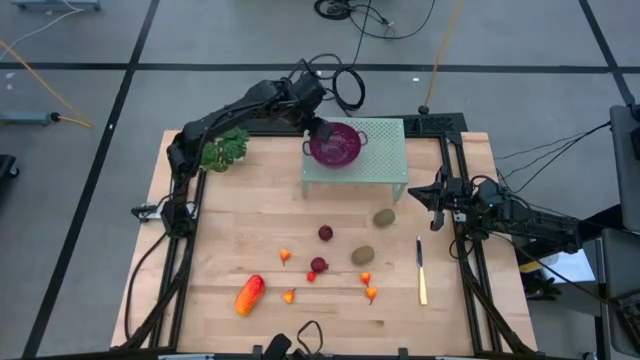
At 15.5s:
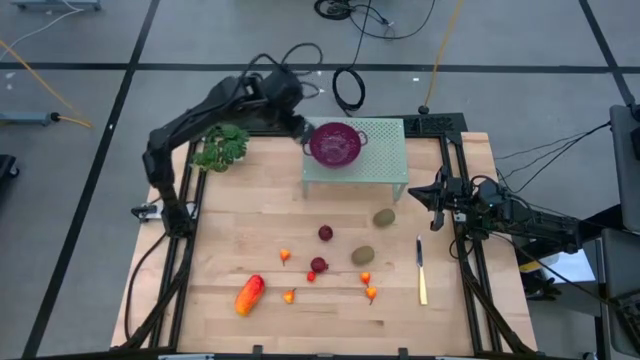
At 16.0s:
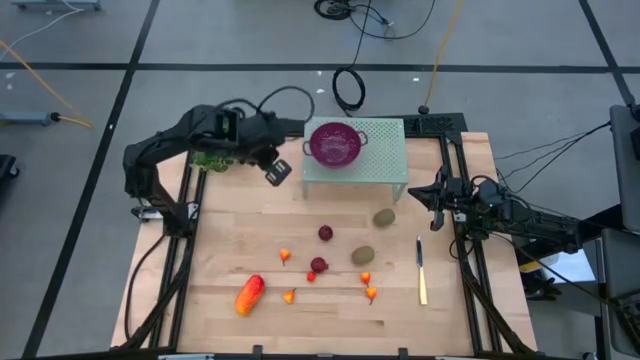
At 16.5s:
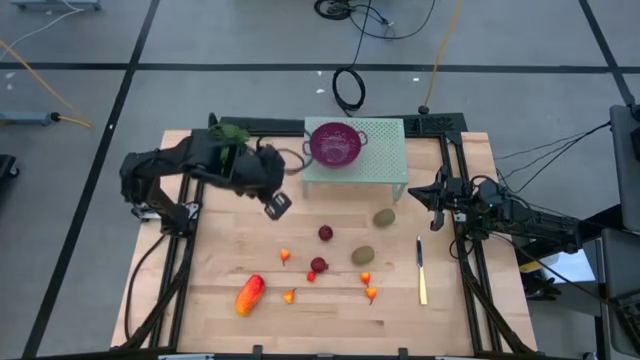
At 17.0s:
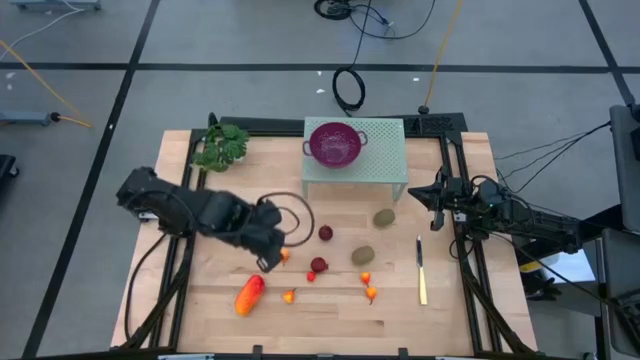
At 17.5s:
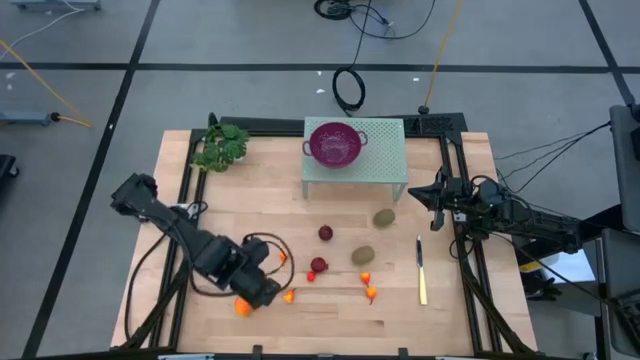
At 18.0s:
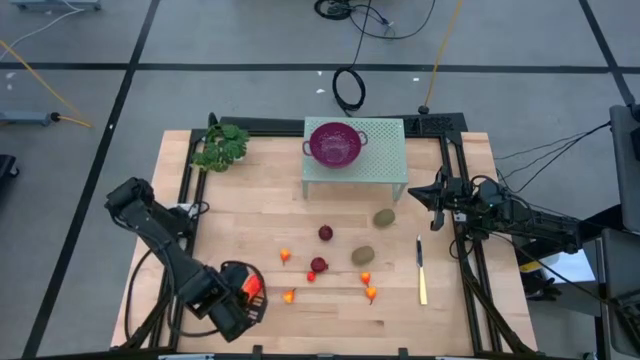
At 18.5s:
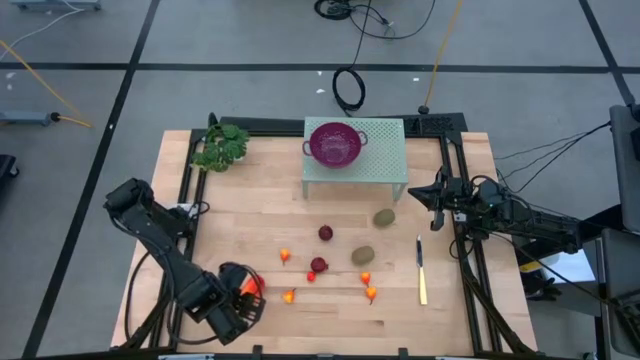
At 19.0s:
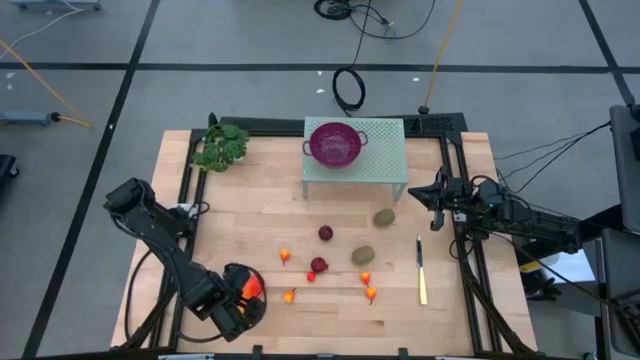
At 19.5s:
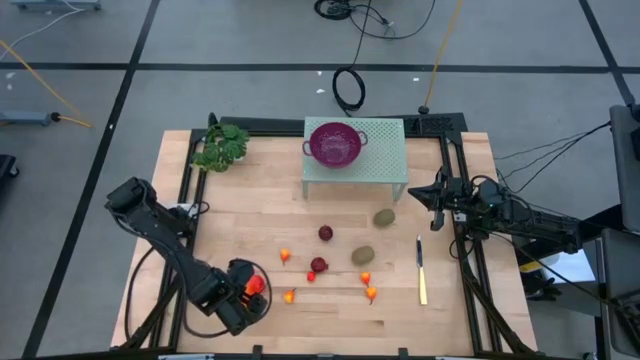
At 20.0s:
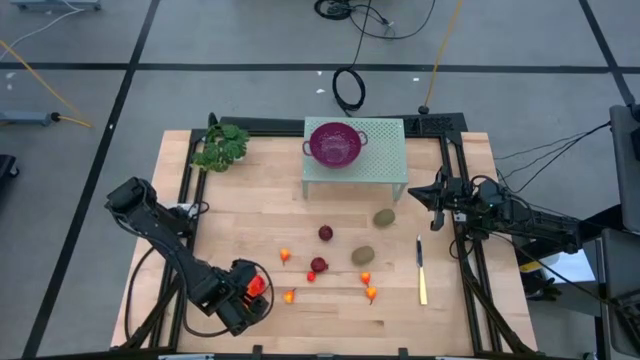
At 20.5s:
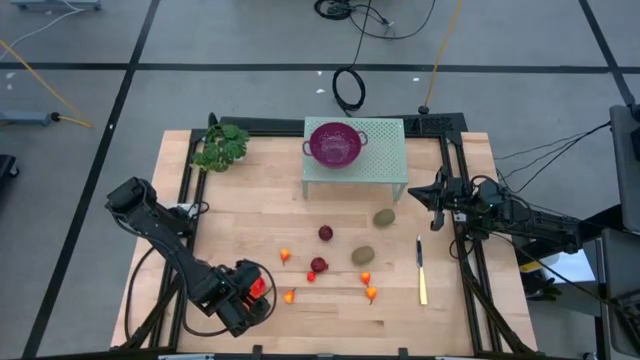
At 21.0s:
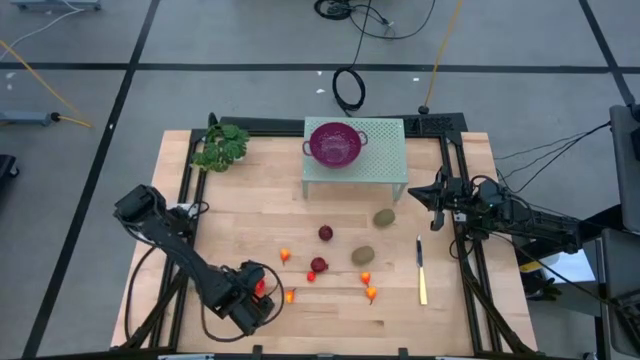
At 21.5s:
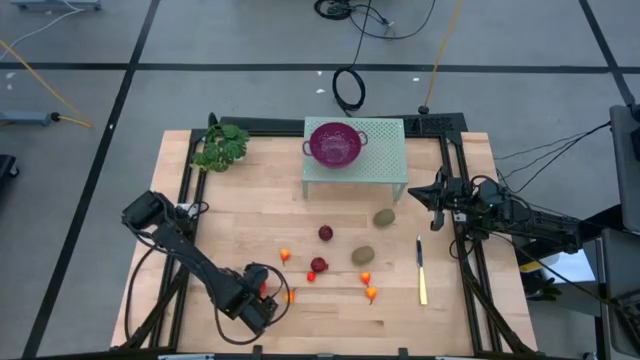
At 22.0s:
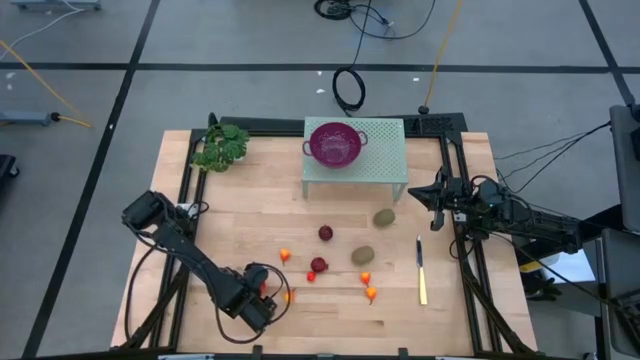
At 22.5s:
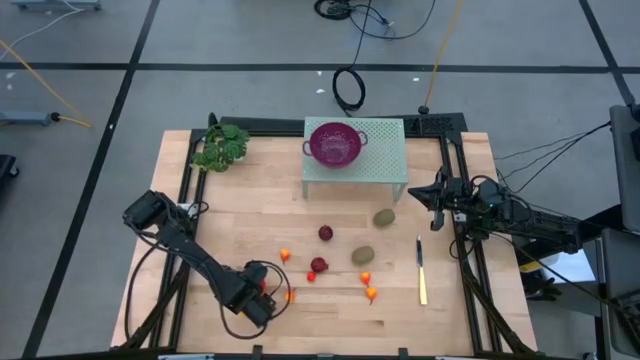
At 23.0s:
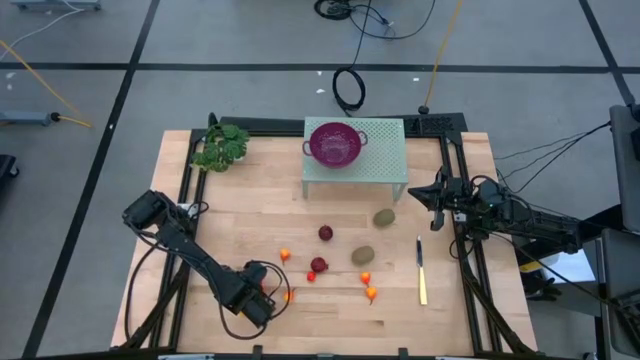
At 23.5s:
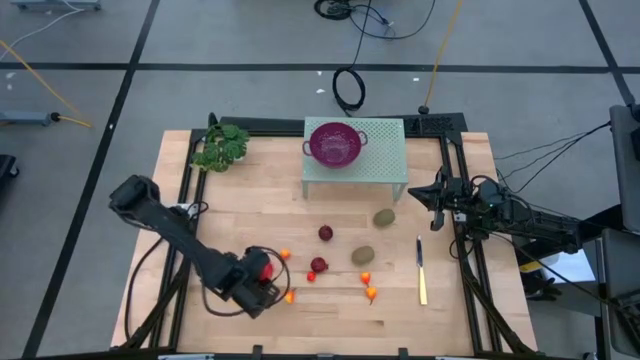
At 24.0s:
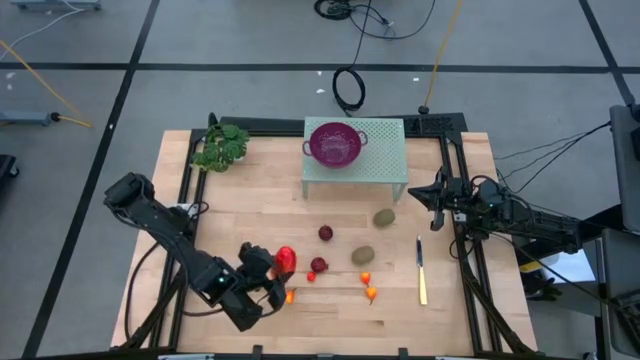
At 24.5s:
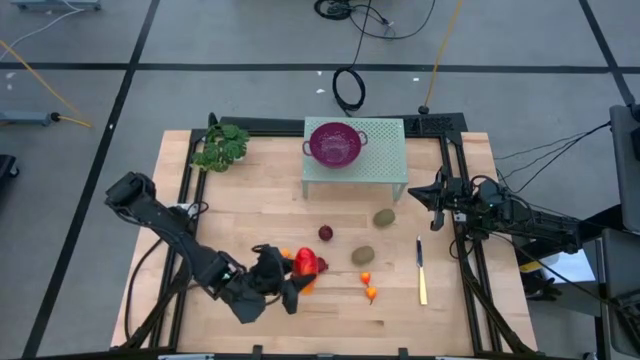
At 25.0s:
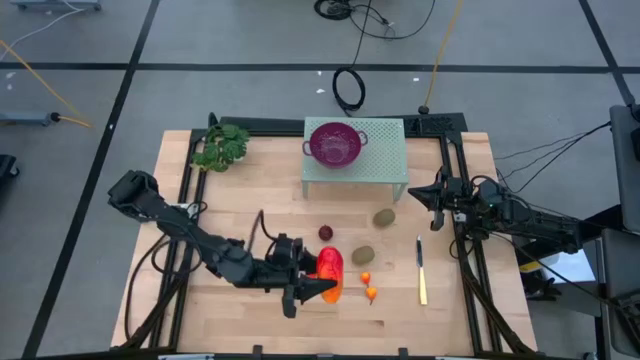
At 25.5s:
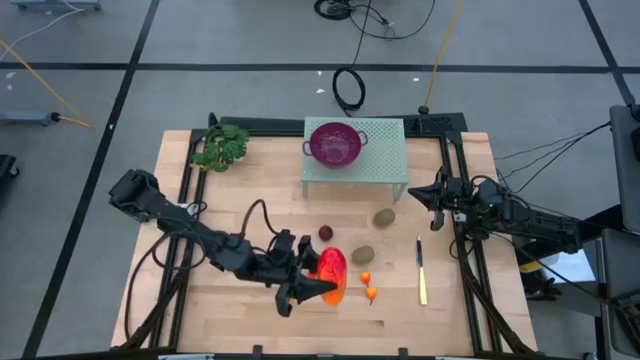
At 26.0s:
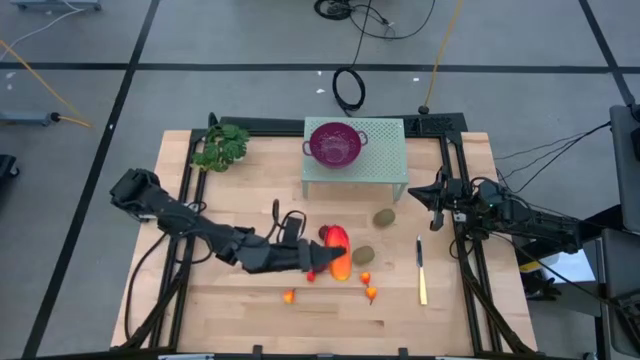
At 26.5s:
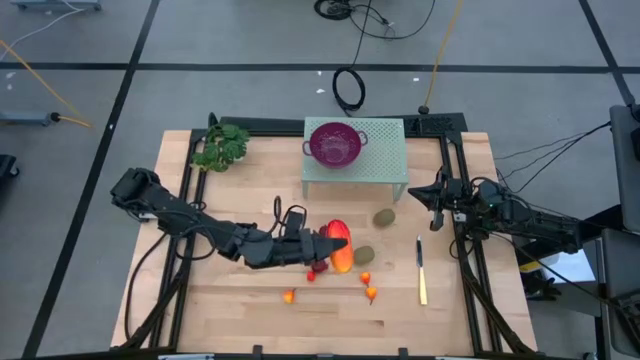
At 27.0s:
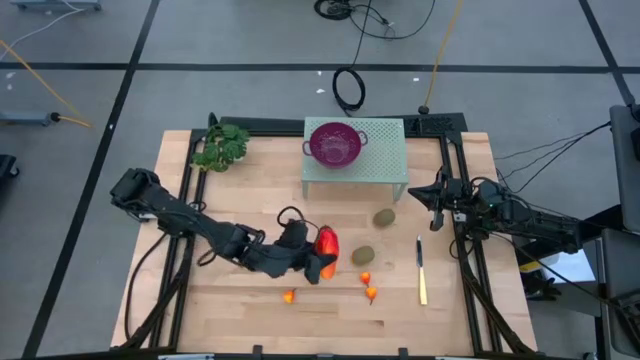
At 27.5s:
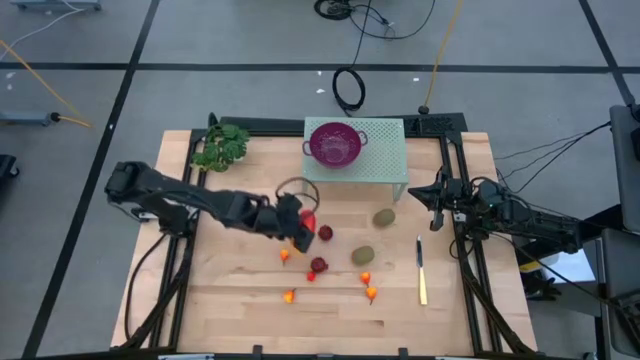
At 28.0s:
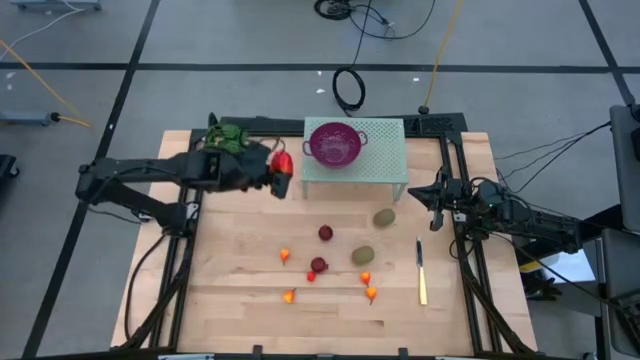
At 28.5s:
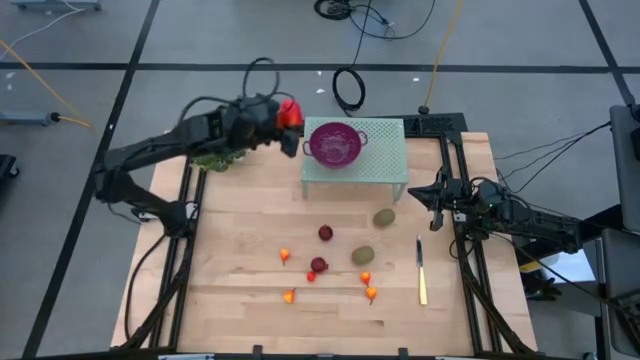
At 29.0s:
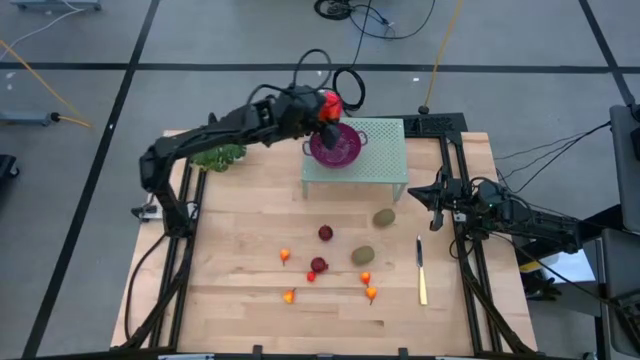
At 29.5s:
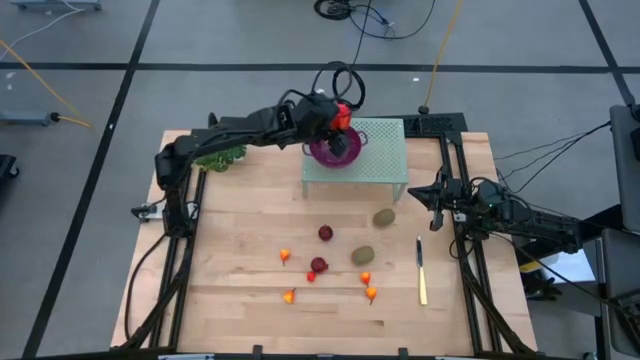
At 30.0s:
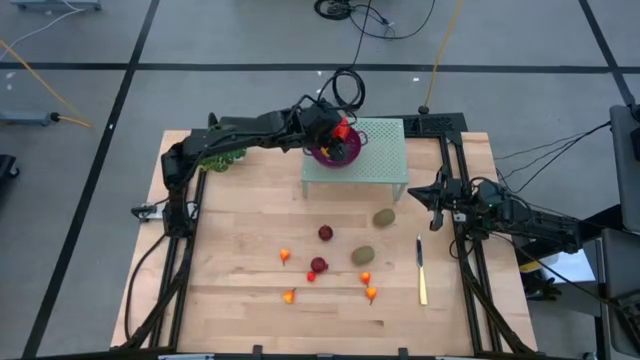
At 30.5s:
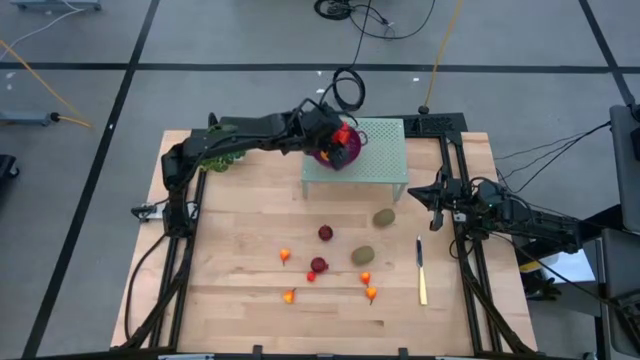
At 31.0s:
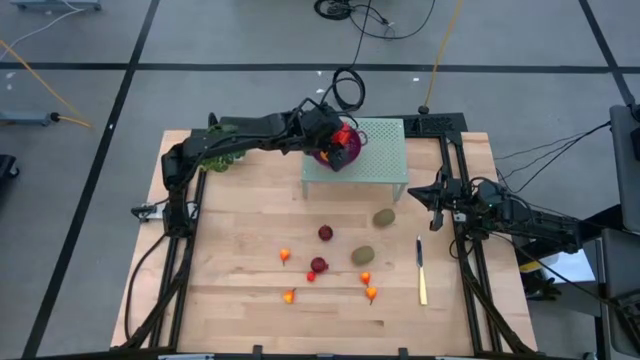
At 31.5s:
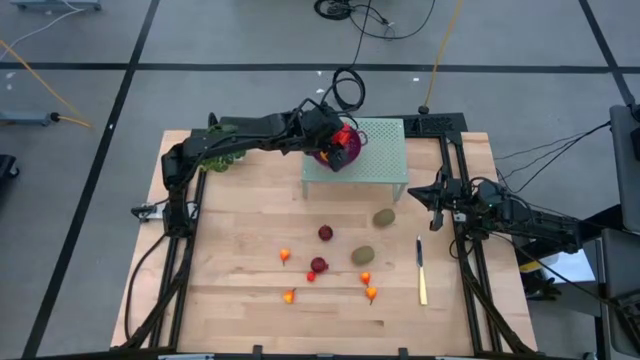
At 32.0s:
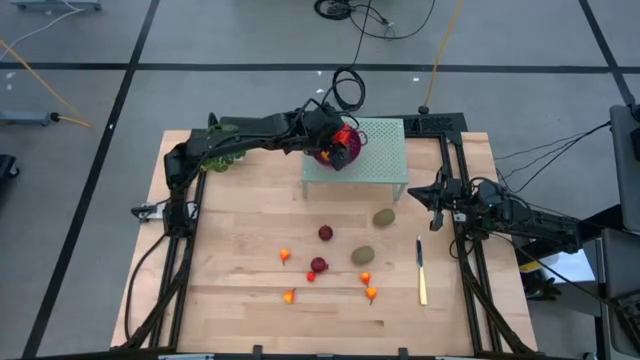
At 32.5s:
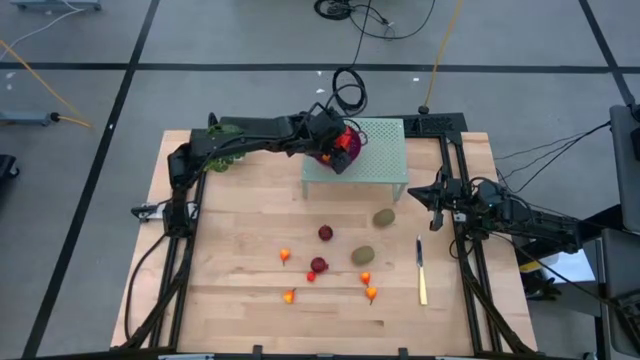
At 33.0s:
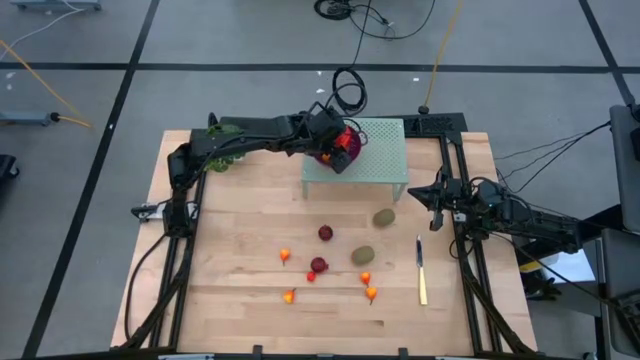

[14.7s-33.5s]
Task: Pick & Place Fruit
Put the mango into the strainer bowl

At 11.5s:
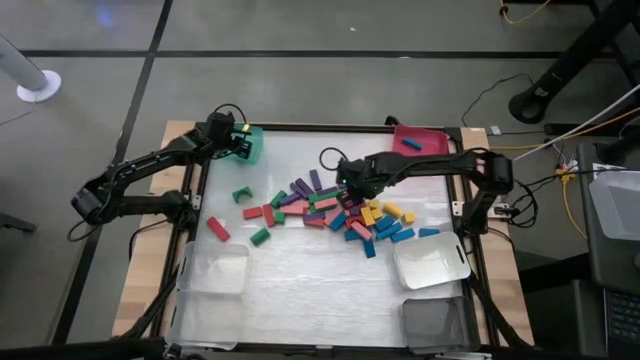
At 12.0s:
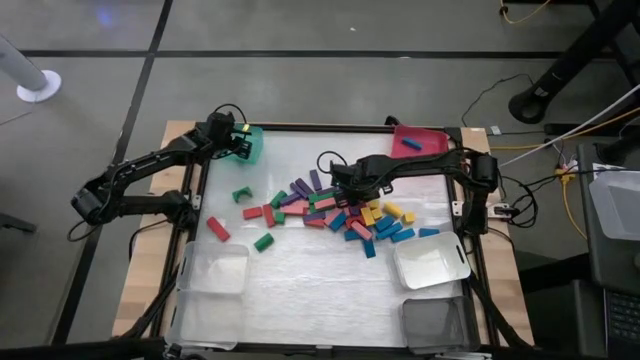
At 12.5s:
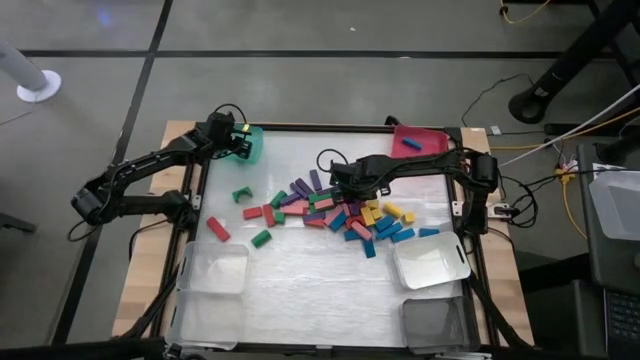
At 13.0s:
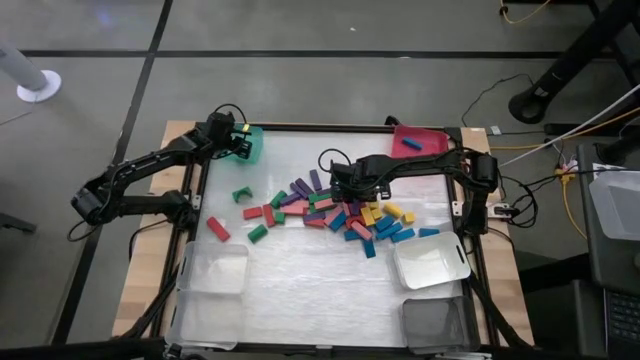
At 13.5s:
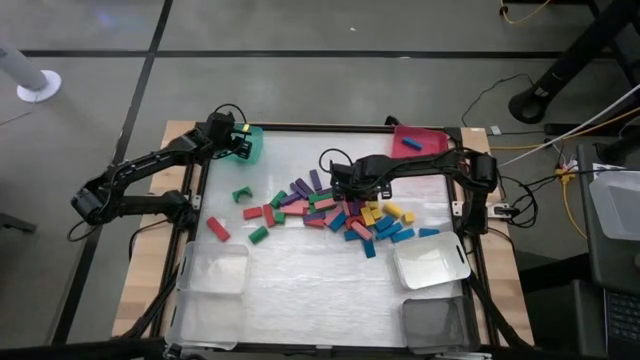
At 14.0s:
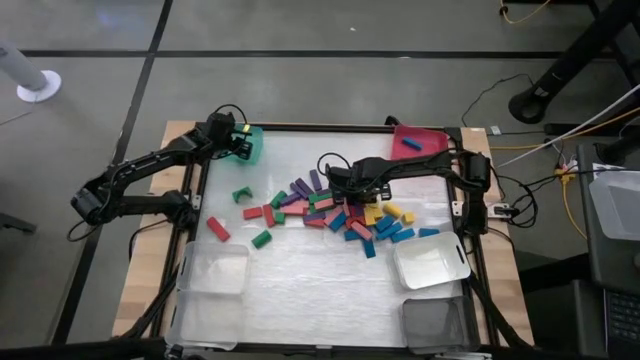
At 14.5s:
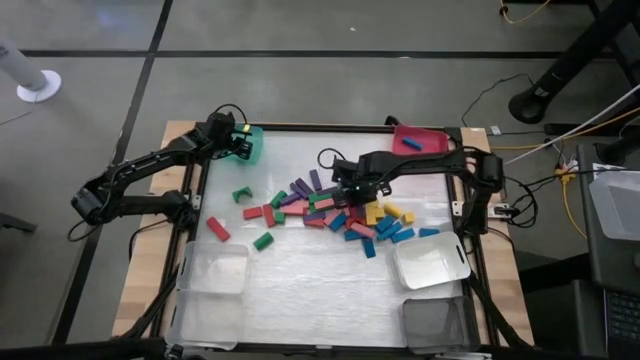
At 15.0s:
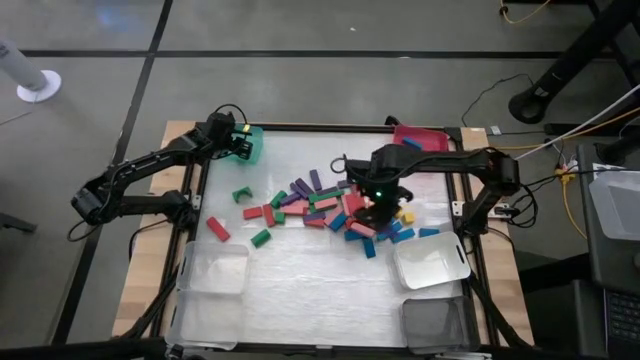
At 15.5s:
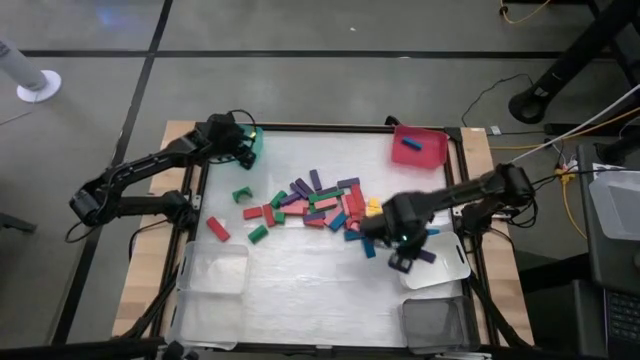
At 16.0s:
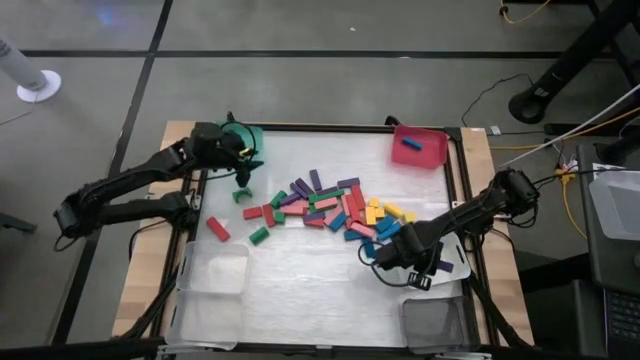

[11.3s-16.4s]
Task: Sort blocks
Put the violet block into the white bin
